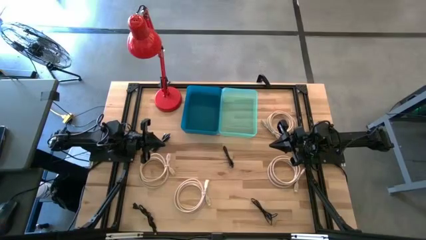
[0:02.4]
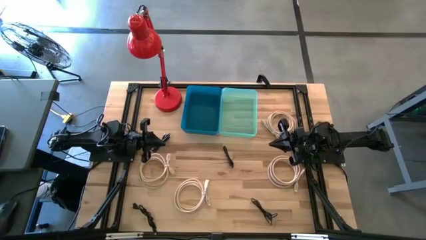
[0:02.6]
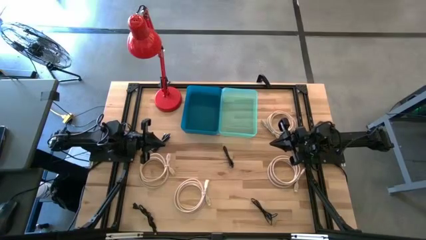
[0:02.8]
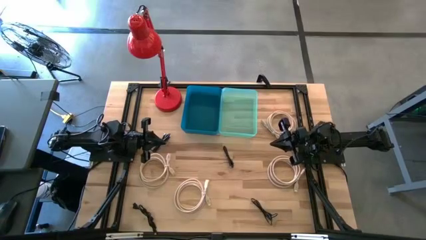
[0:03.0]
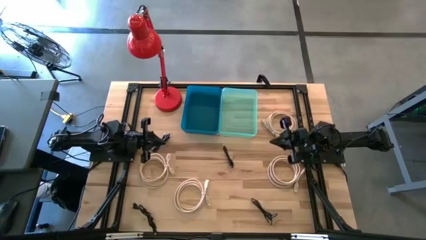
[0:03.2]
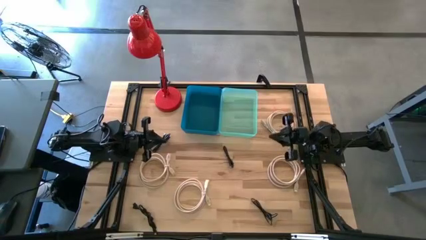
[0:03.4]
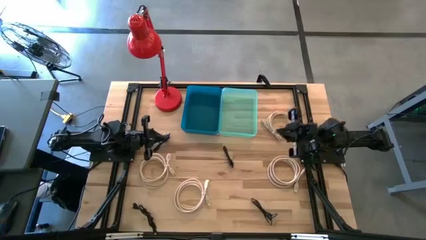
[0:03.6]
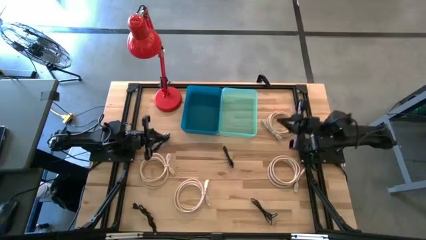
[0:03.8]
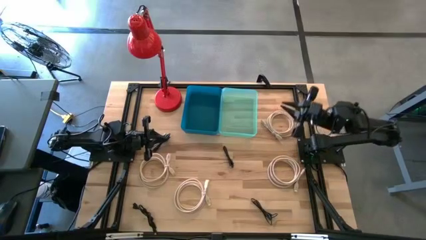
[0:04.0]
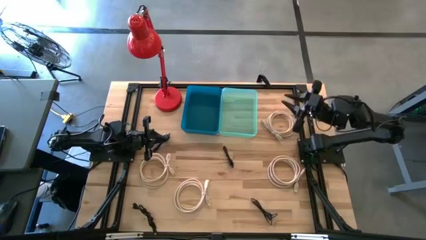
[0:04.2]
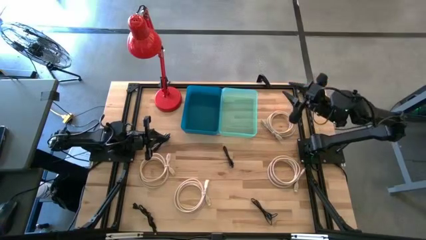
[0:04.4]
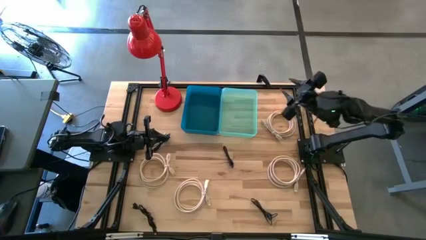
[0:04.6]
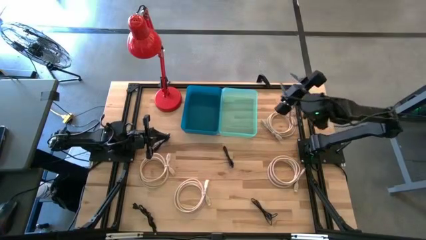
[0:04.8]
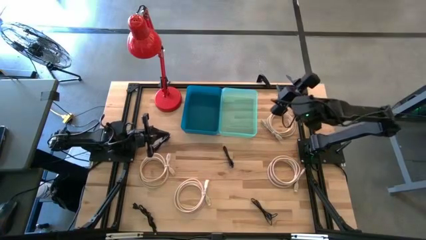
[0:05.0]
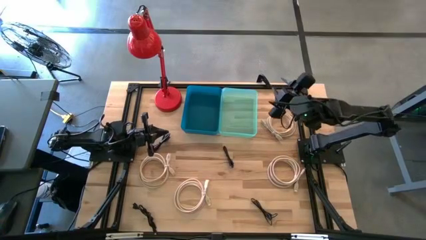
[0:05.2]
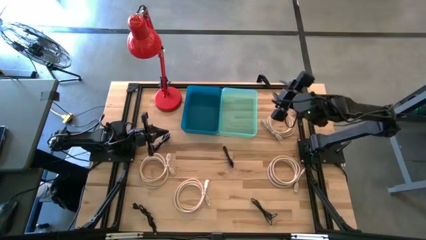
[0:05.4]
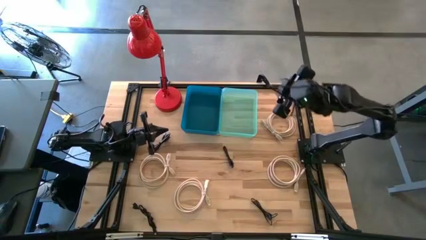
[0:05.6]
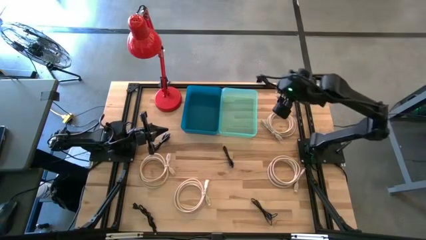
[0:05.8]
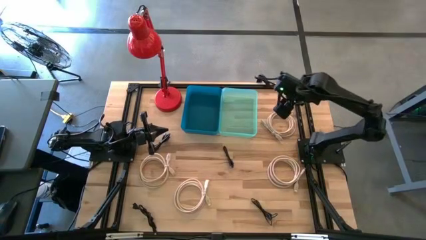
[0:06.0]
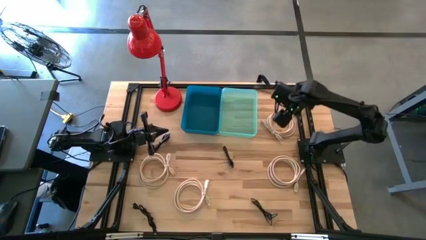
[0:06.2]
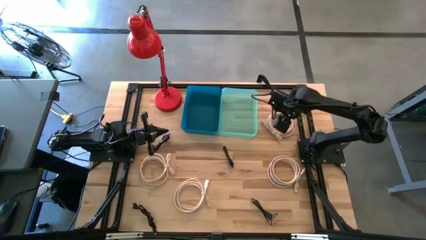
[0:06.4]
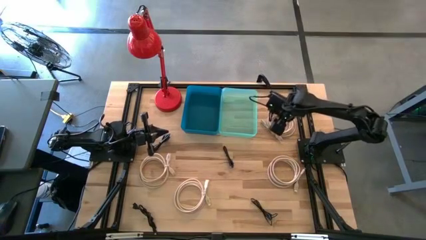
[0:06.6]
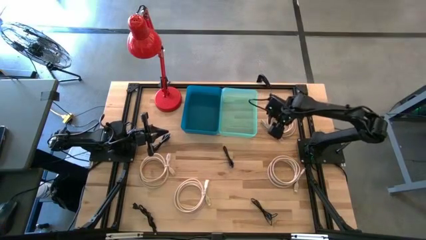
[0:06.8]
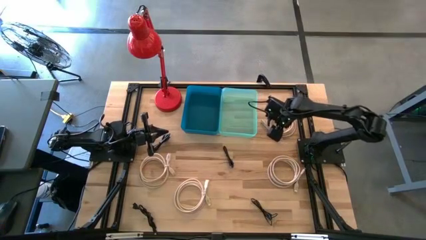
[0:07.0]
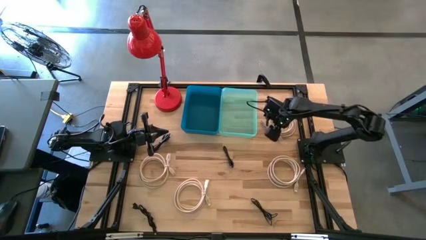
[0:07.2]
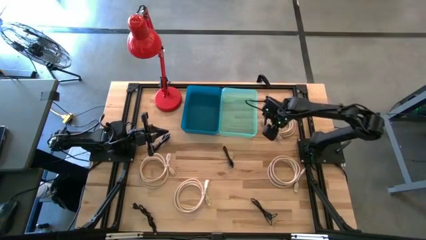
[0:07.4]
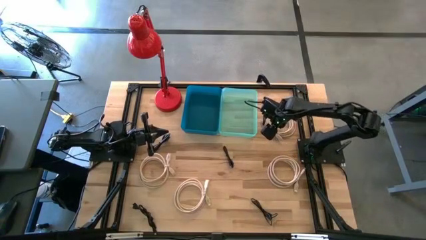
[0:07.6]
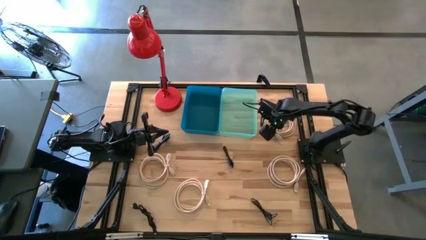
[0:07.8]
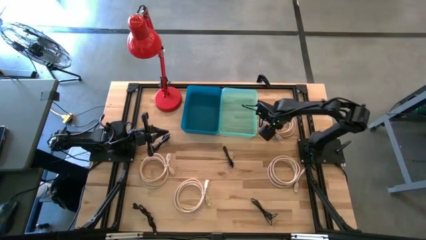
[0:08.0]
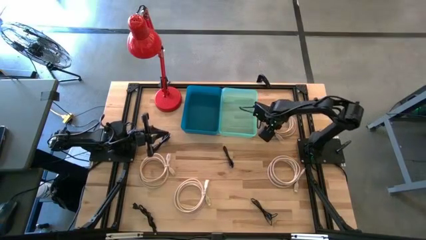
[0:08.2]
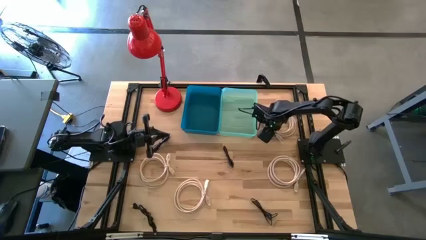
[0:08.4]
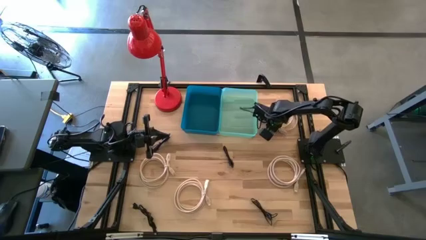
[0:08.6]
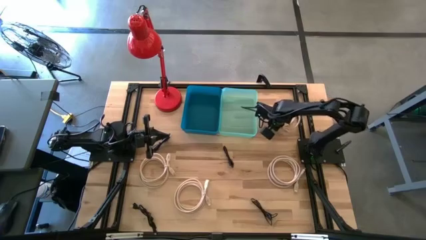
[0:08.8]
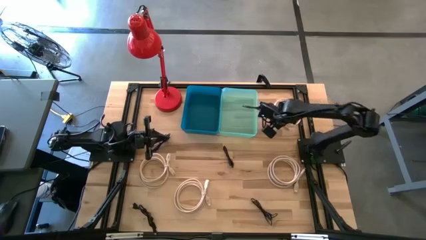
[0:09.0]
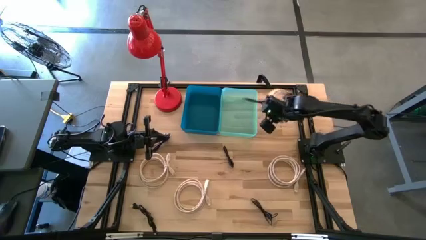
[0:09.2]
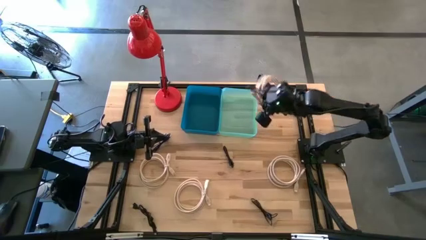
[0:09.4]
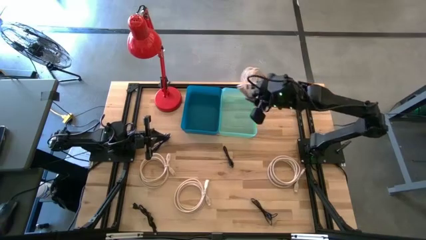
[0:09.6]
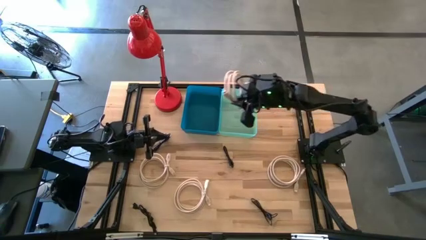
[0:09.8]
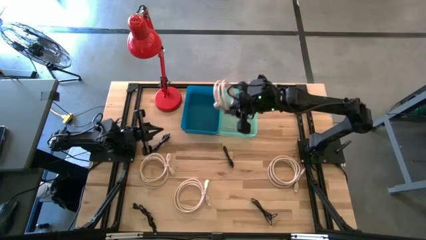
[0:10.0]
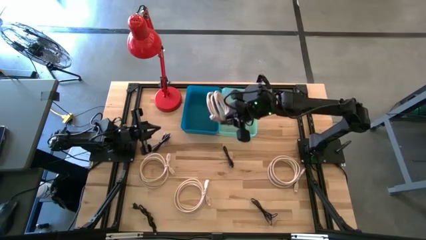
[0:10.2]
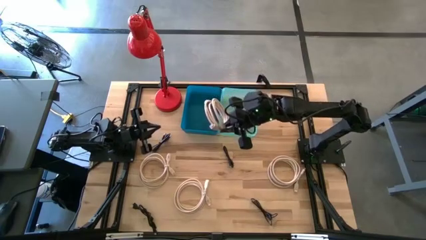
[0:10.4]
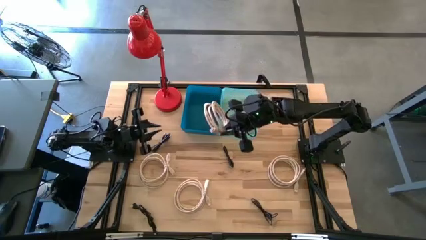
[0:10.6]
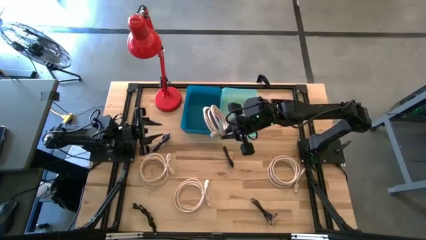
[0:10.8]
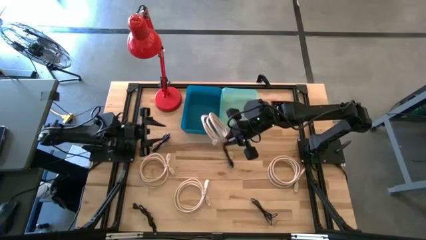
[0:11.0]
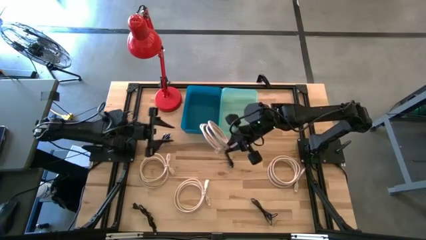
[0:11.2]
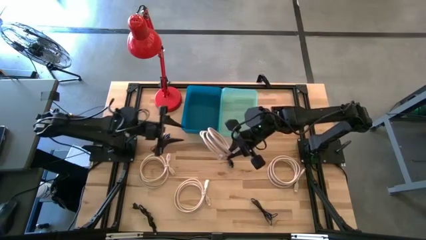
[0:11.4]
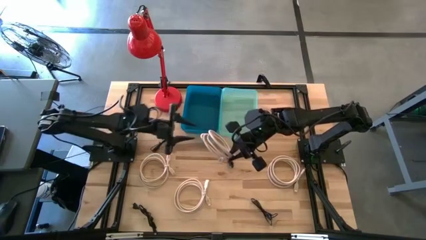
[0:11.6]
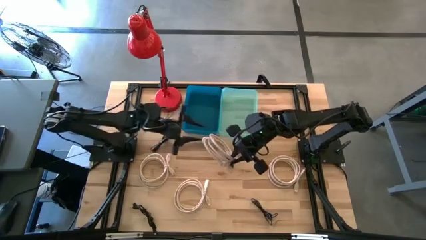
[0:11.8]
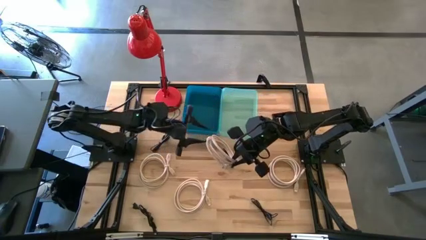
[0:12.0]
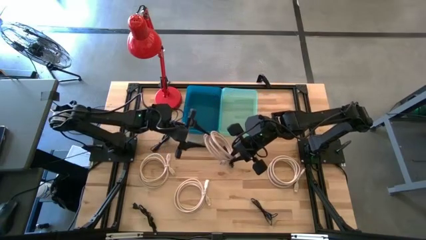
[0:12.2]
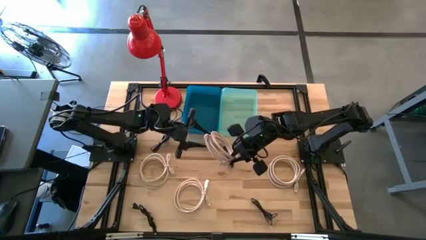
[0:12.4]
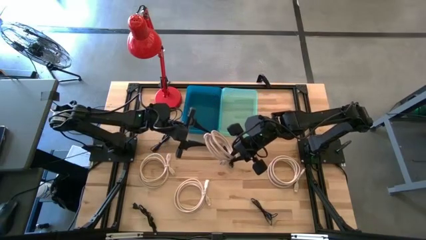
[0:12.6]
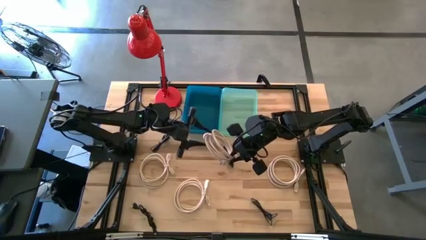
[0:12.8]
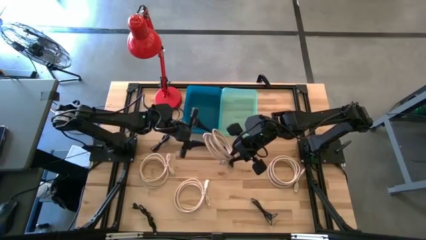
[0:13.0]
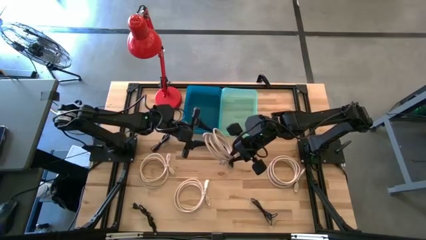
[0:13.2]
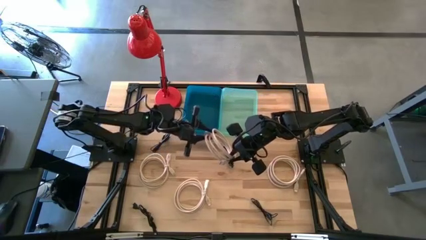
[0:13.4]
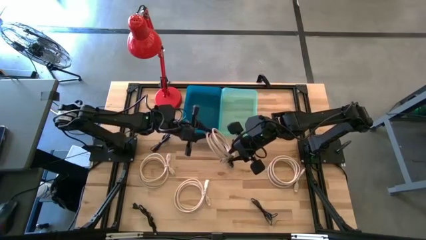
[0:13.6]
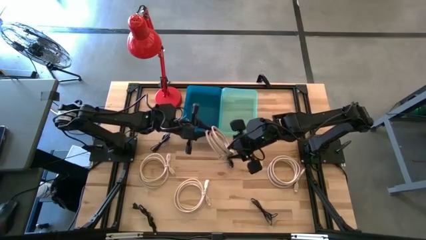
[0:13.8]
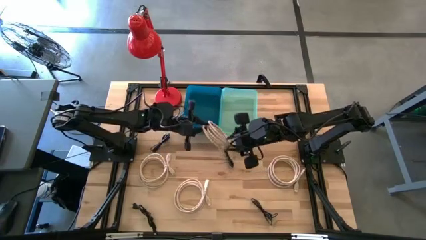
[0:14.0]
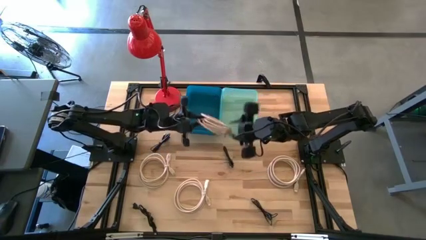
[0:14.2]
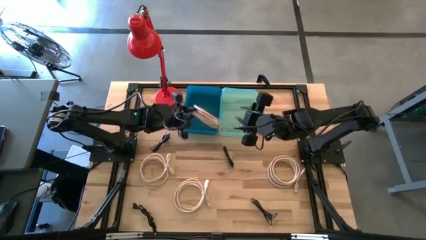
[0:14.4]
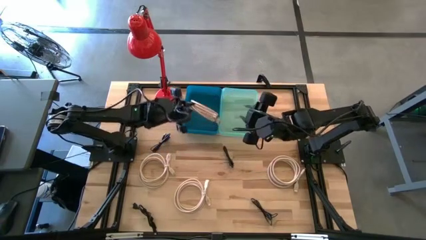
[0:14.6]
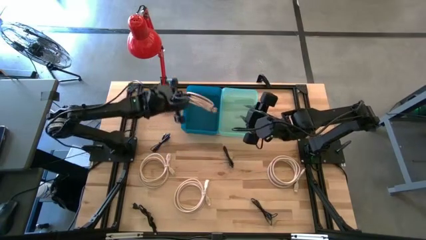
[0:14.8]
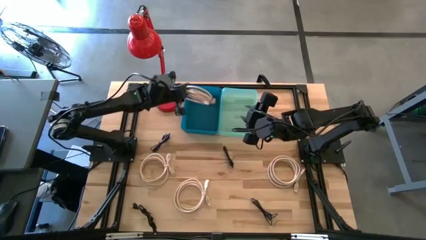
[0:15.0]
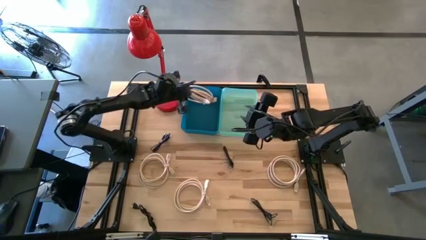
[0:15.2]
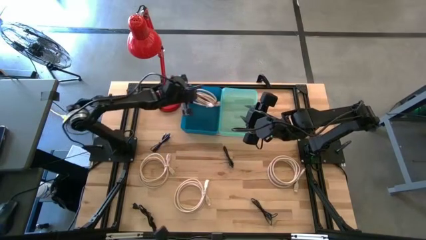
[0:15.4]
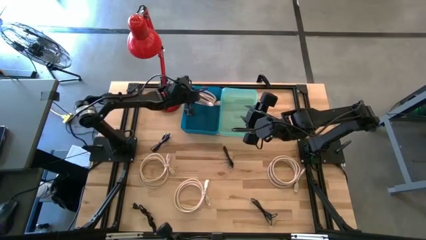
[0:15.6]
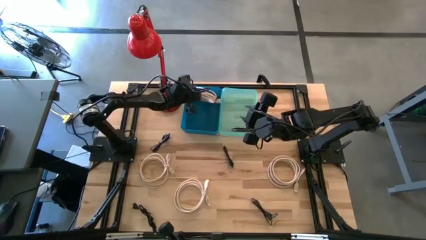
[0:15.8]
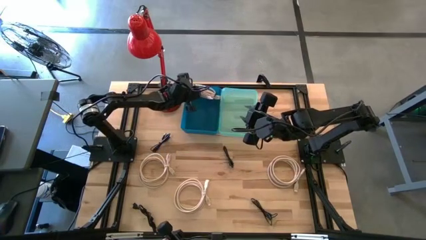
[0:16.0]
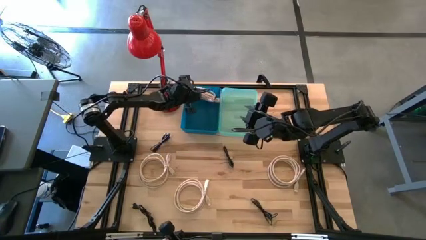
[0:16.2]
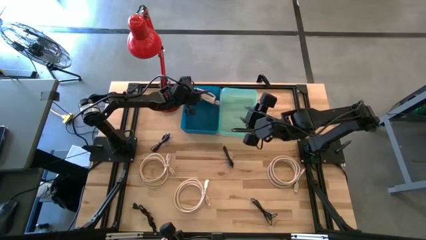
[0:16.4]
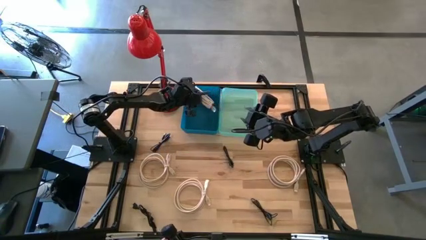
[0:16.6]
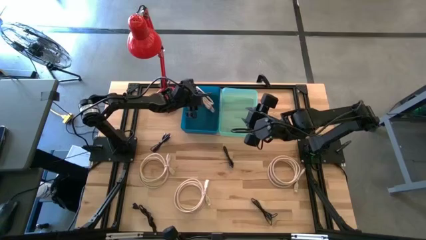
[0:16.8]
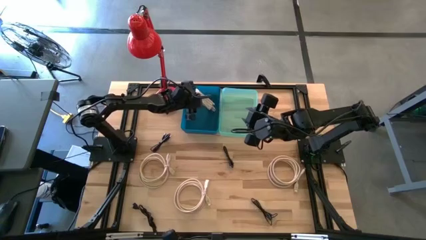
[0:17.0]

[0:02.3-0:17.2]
Task: Pick & Place USB Port
Put the white HDMI cable into the blue bin
